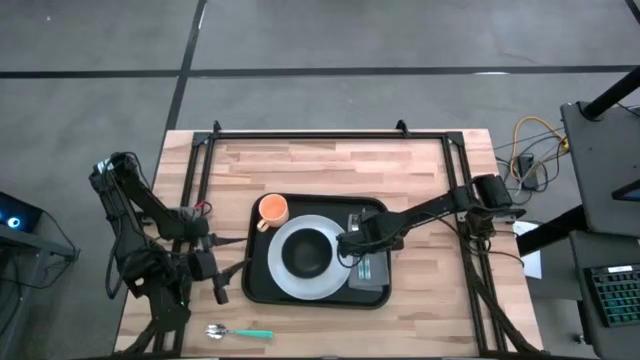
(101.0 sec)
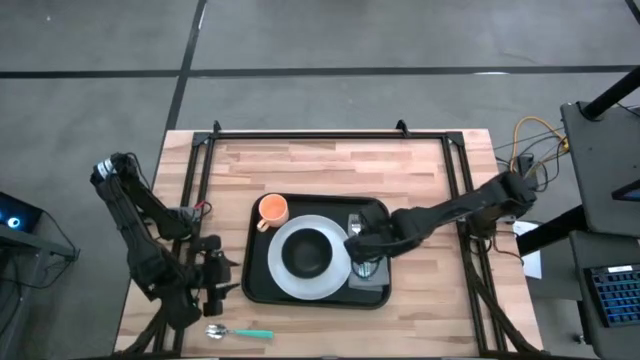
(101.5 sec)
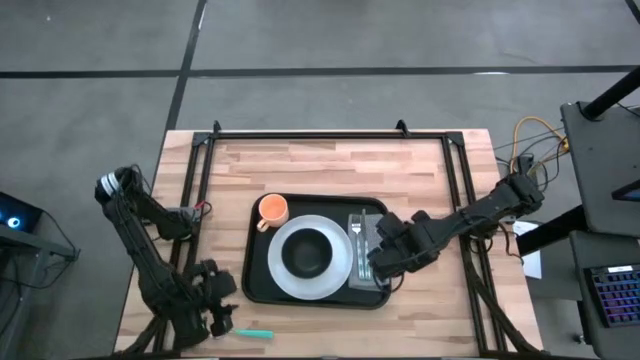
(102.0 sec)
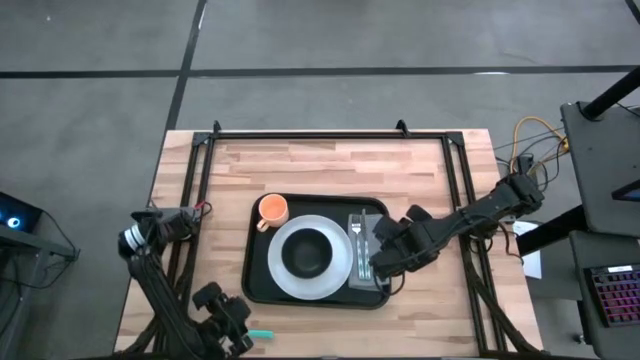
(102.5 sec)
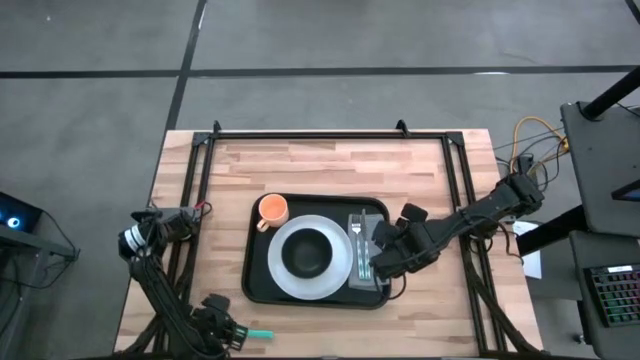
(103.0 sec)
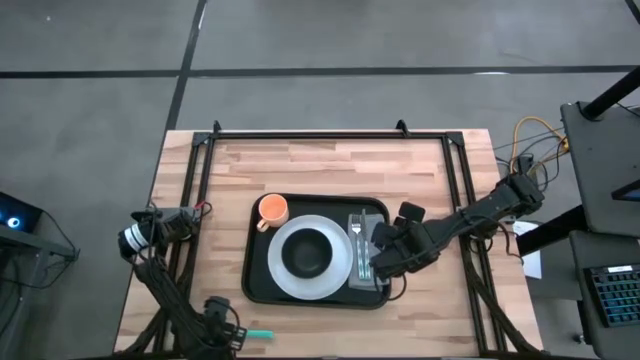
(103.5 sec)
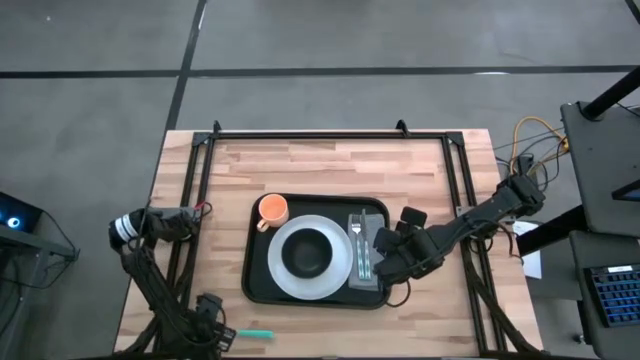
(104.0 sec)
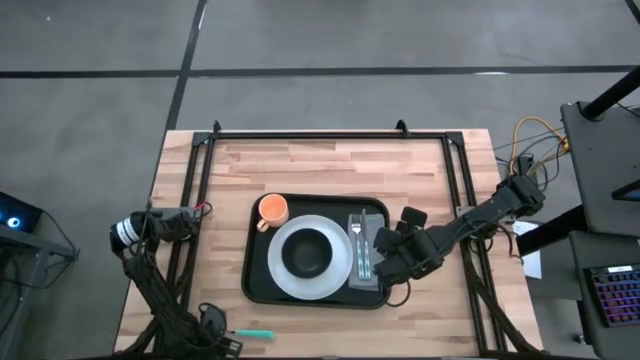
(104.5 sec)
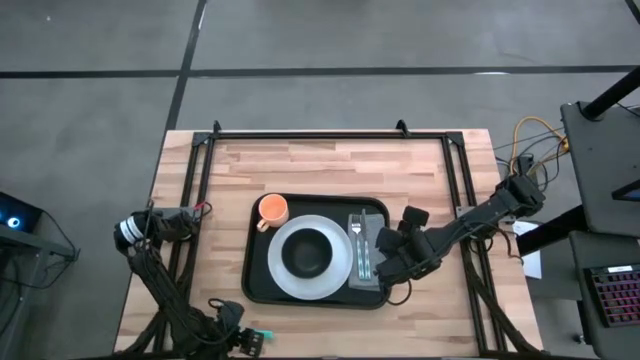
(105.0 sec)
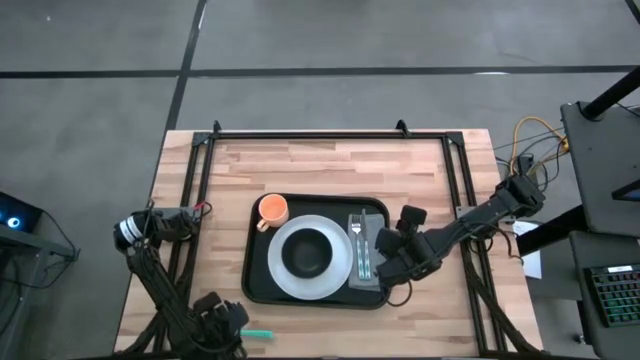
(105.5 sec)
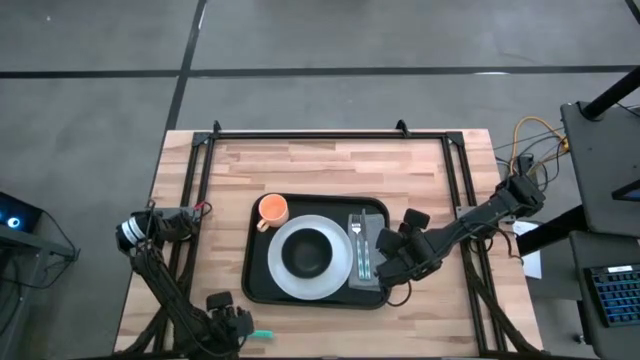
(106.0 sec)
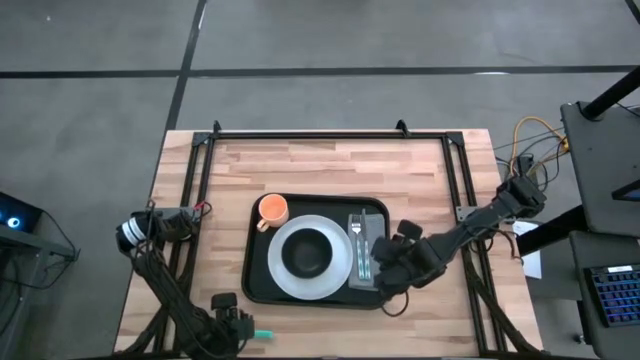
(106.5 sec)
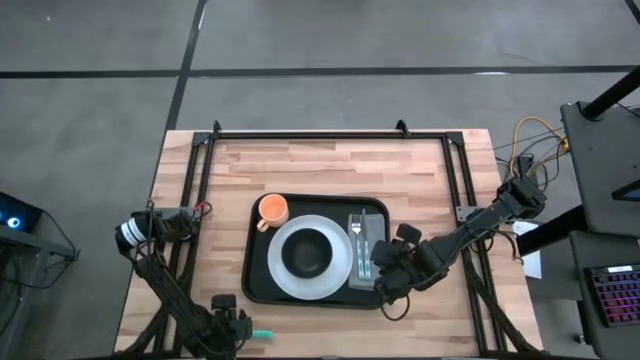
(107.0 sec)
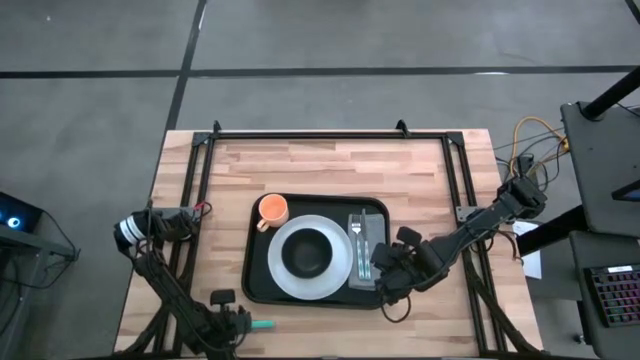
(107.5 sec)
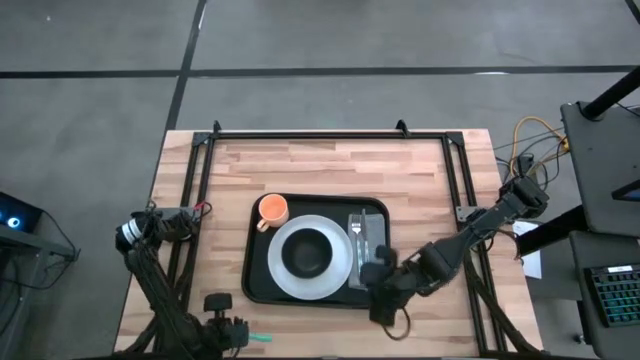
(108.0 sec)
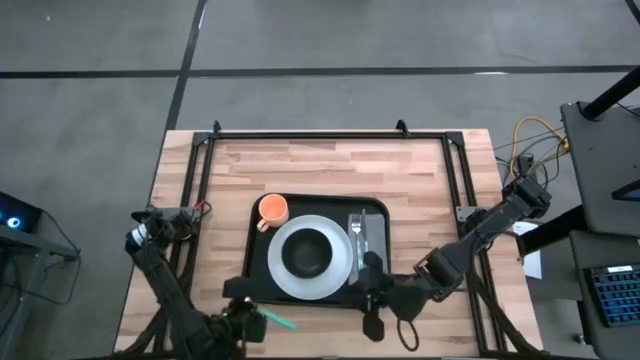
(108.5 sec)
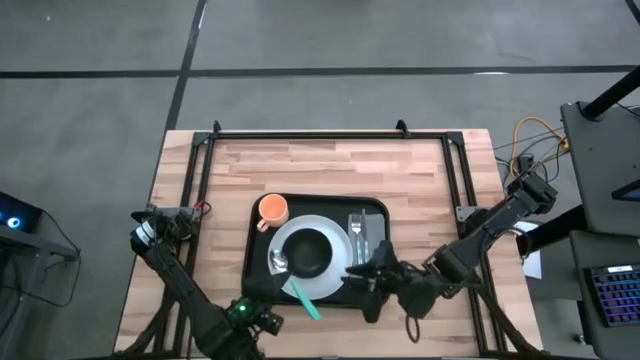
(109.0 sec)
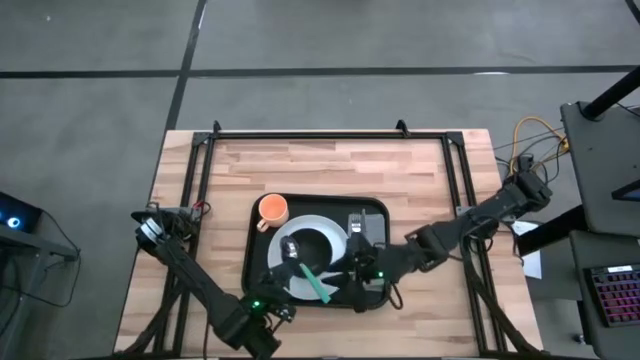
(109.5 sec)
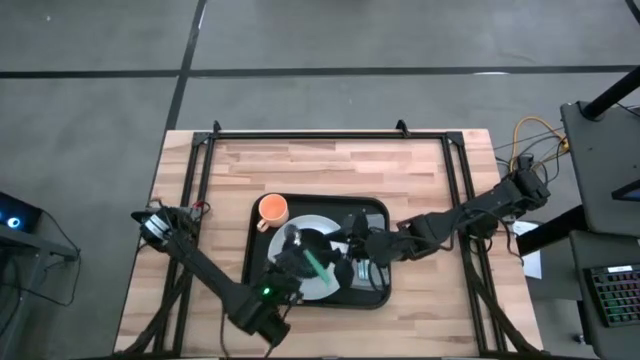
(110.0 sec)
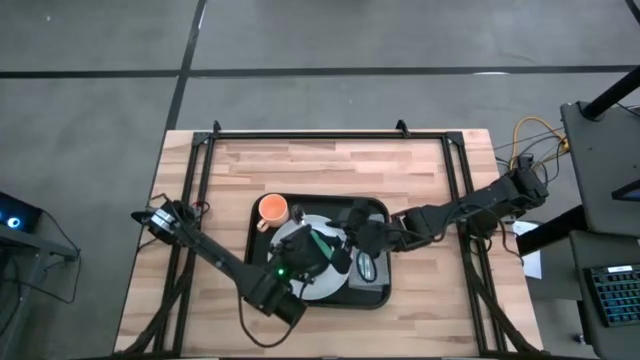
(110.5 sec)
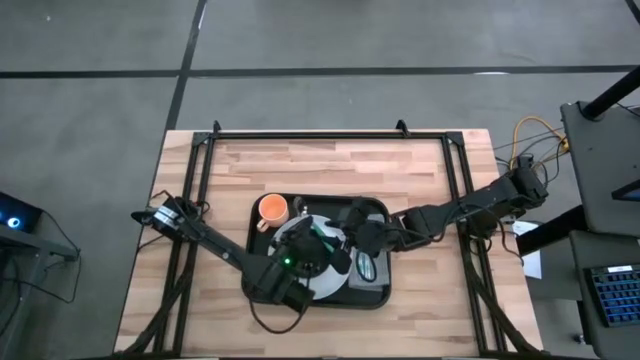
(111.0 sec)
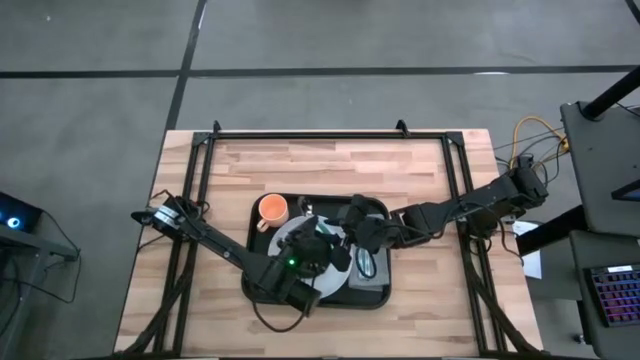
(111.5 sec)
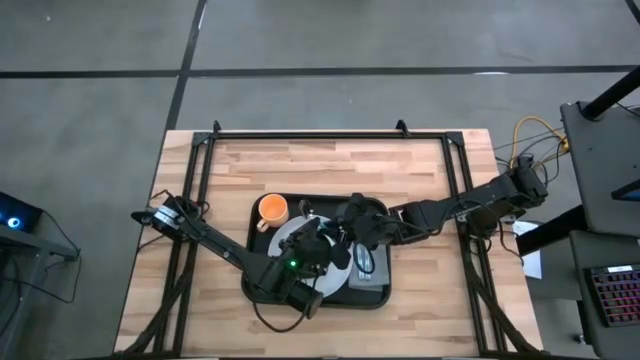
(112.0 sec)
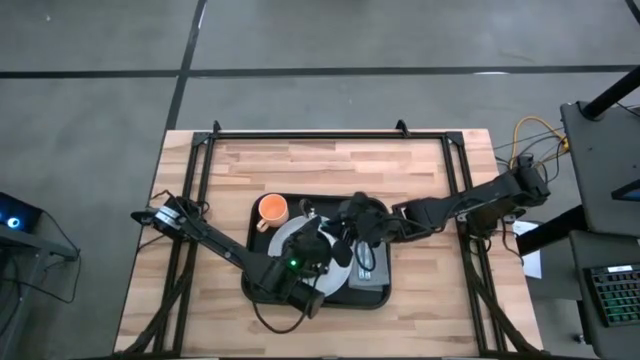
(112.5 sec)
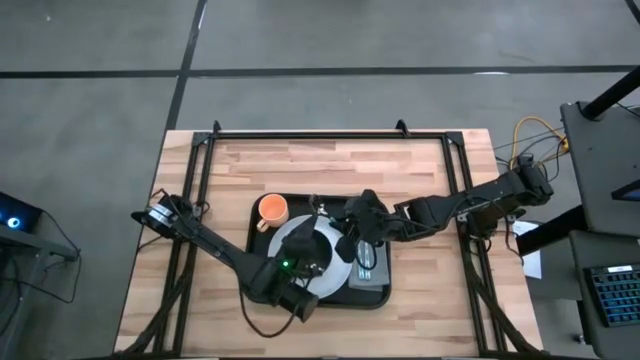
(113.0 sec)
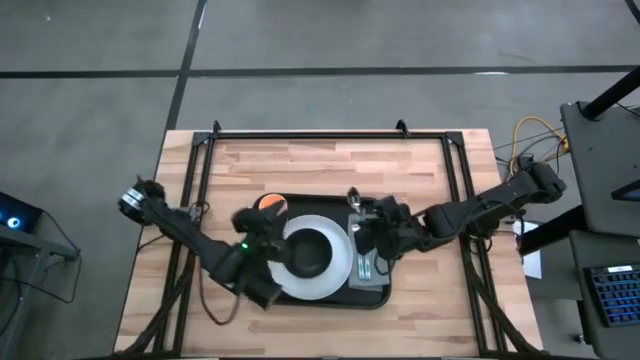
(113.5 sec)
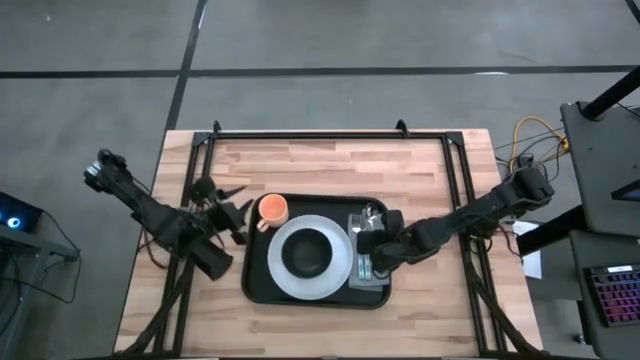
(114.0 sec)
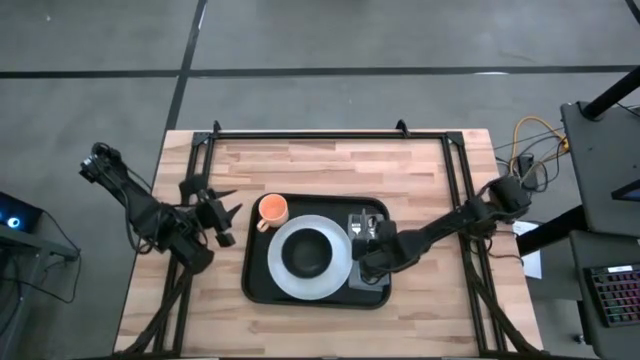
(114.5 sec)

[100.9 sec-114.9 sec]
Task: Set up tray
Put the blue spoon on top of the gray napkin on the right of the blue fork

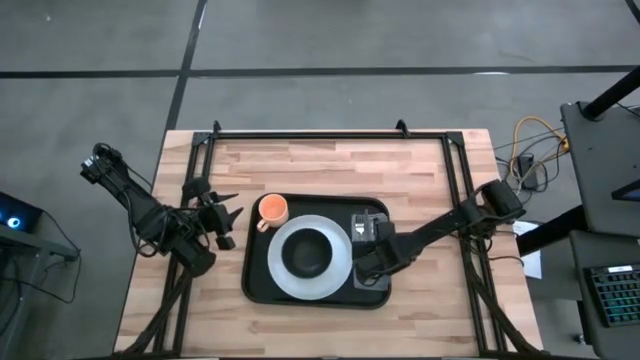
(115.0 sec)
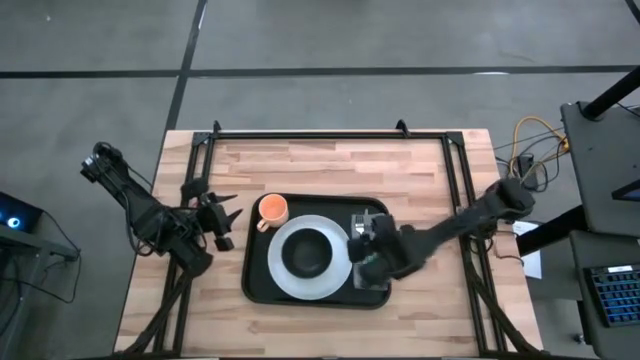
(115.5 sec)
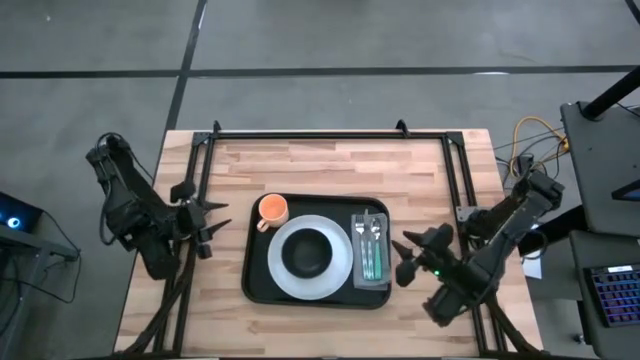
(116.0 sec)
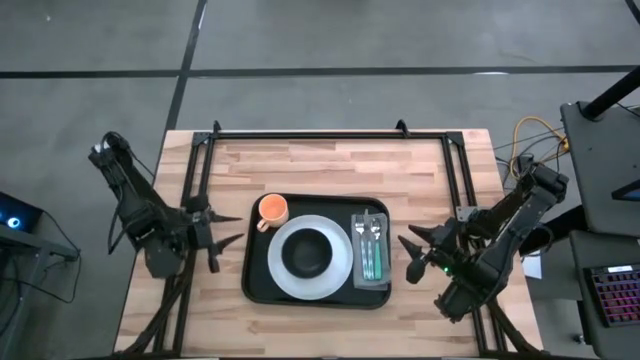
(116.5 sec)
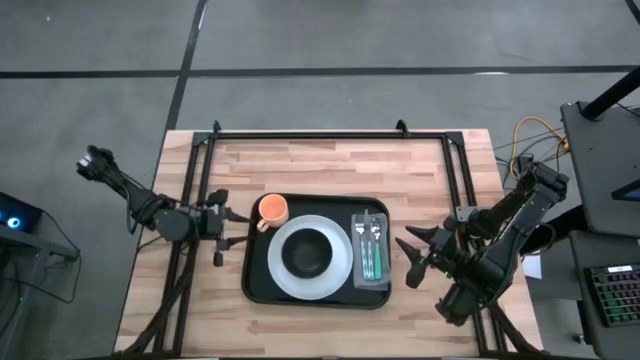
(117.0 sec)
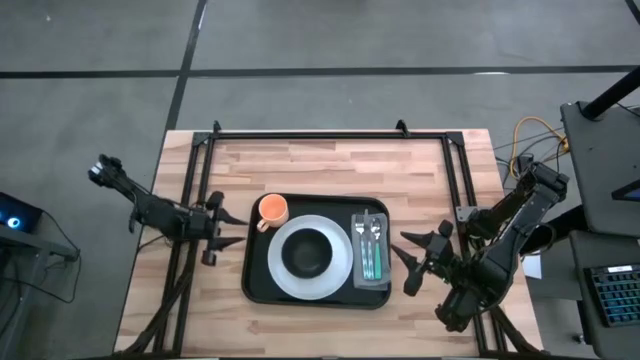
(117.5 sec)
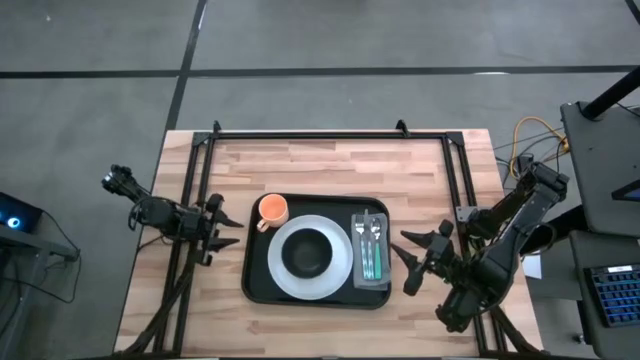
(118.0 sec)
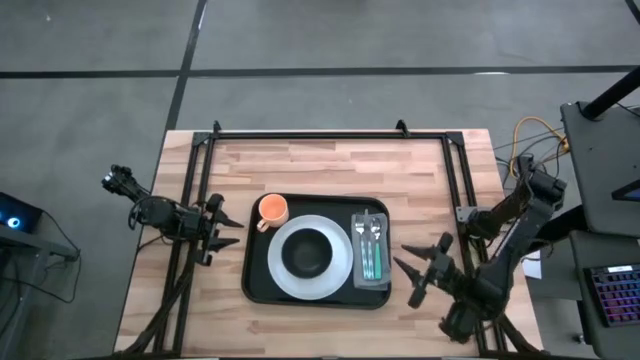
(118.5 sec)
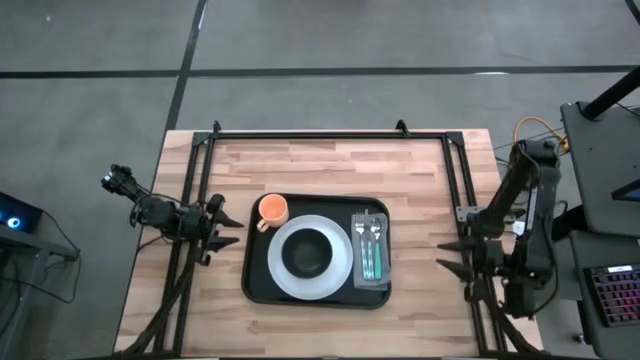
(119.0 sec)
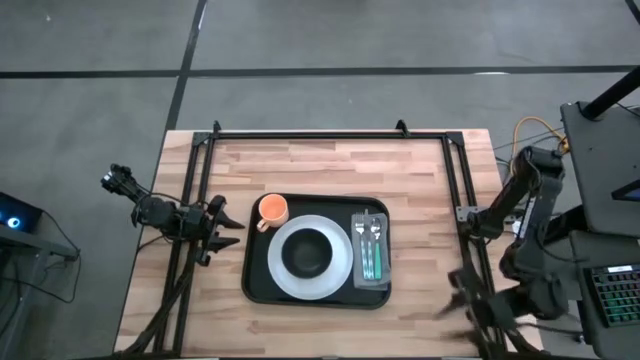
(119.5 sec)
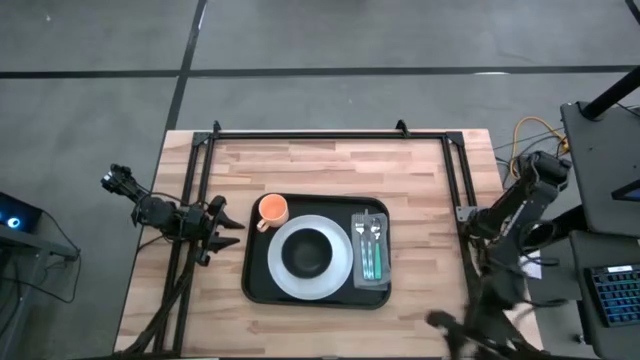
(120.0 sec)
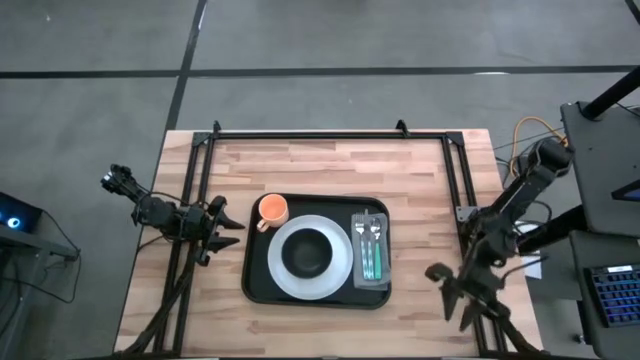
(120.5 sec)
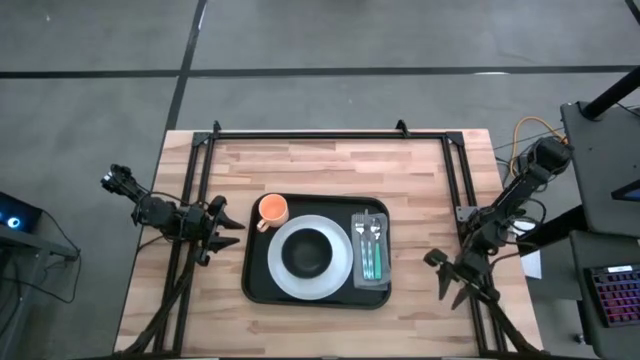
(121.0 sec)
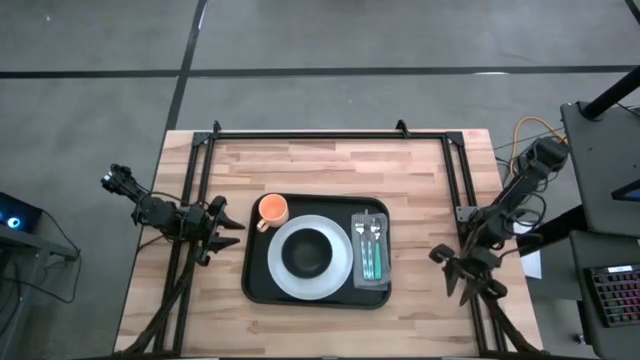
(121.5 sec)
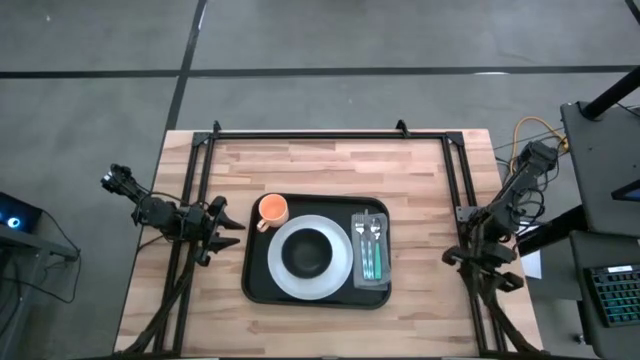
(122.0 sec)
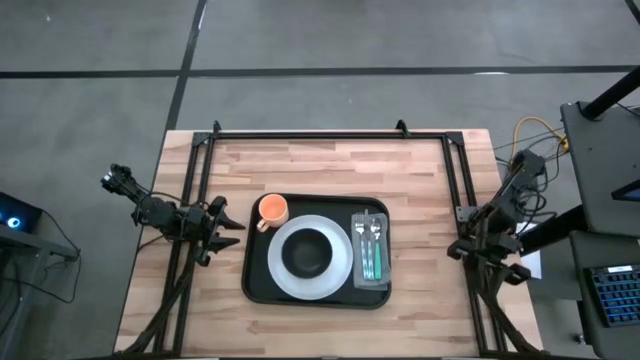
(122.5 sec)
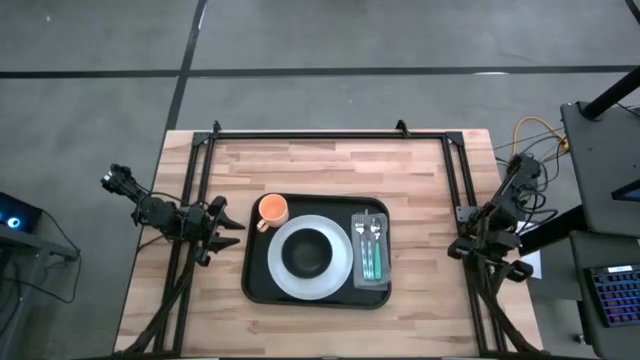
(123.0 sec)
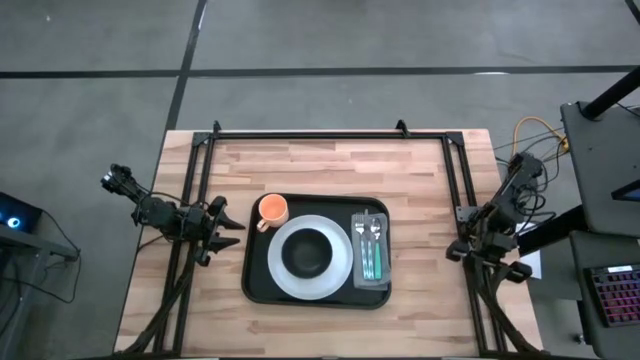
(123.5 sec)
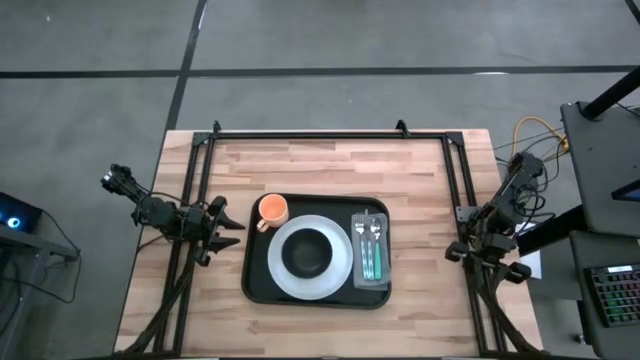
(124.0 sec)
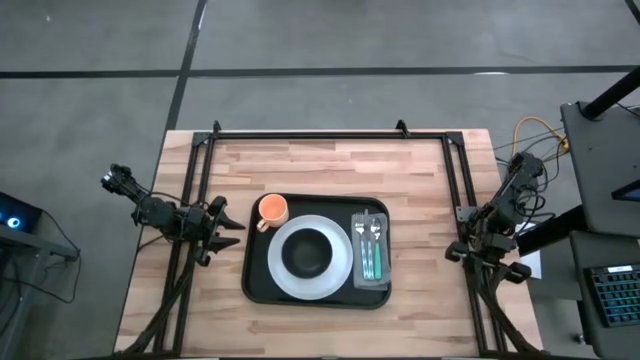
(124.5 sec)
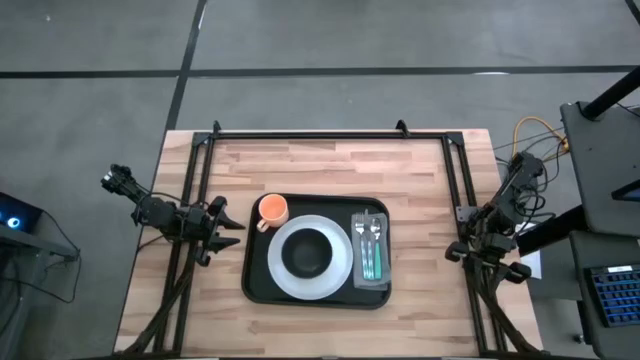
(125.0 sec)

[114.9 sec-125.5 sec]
Return to Home Position
